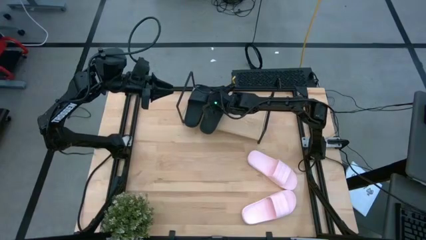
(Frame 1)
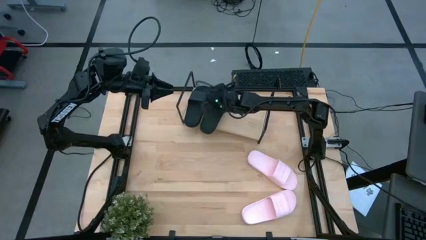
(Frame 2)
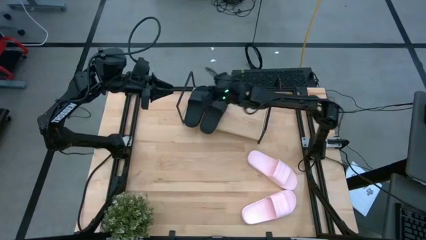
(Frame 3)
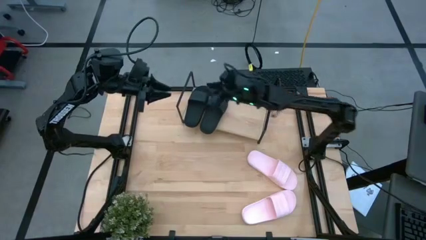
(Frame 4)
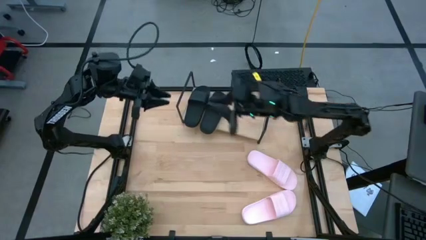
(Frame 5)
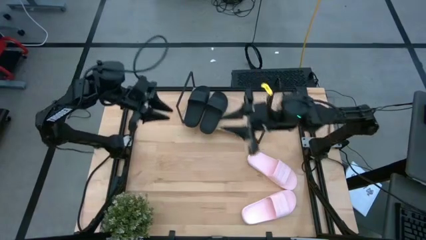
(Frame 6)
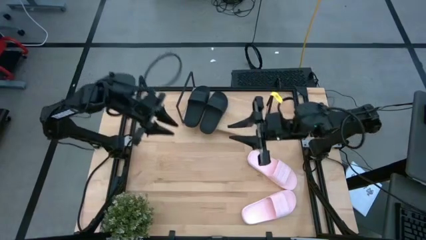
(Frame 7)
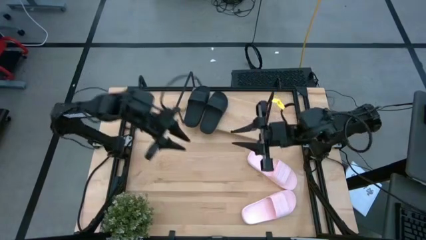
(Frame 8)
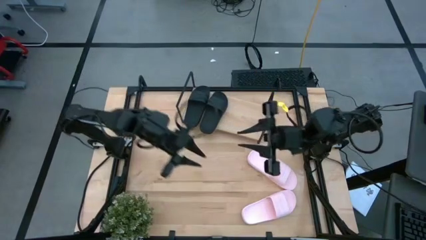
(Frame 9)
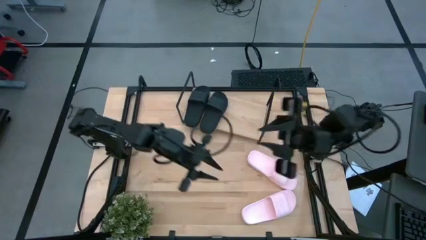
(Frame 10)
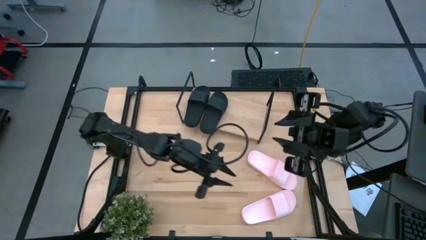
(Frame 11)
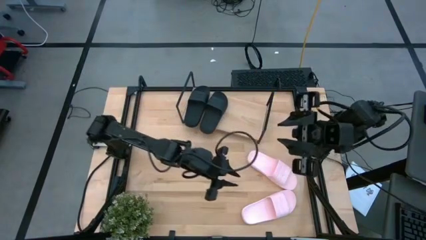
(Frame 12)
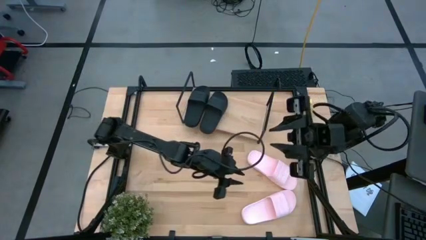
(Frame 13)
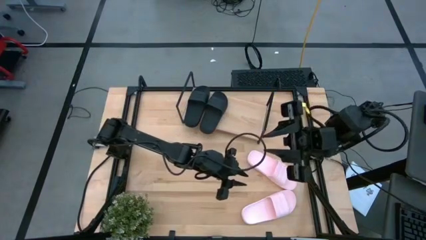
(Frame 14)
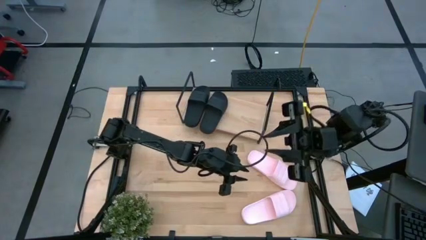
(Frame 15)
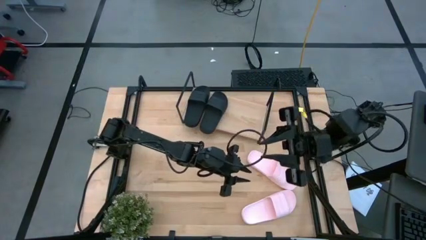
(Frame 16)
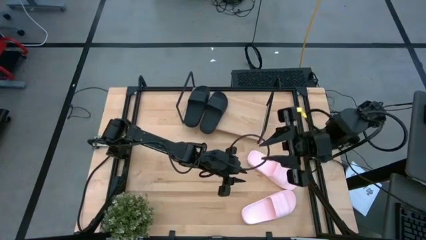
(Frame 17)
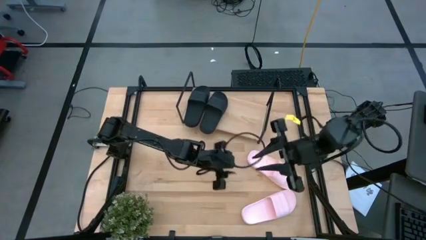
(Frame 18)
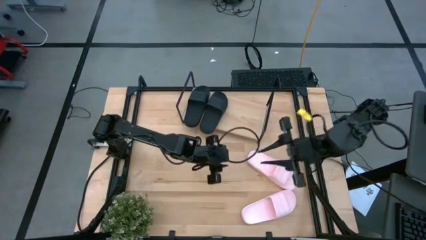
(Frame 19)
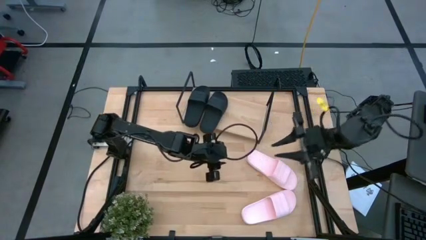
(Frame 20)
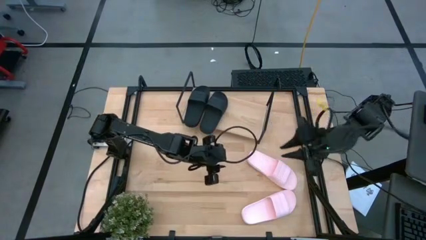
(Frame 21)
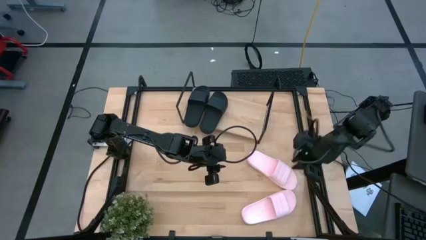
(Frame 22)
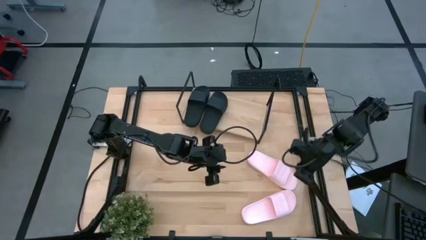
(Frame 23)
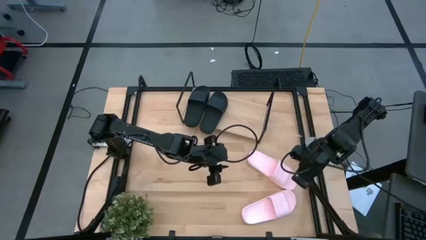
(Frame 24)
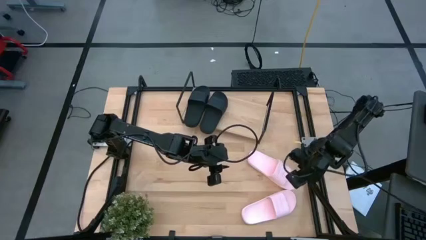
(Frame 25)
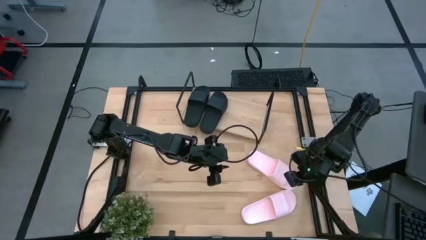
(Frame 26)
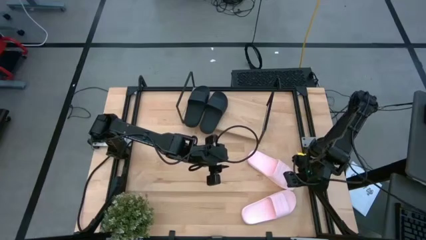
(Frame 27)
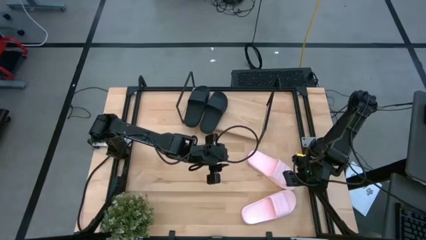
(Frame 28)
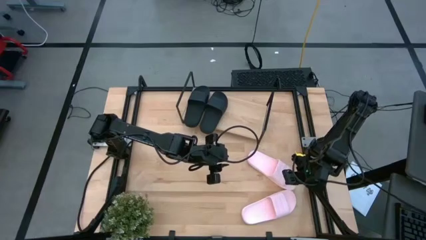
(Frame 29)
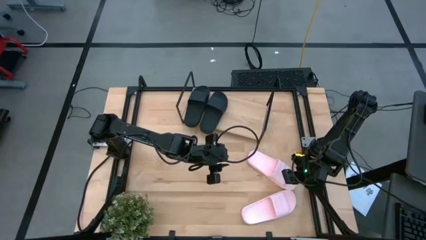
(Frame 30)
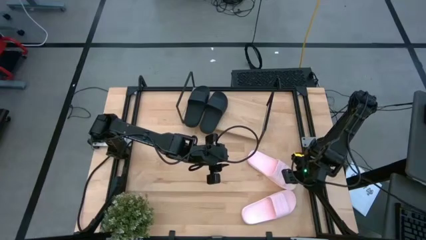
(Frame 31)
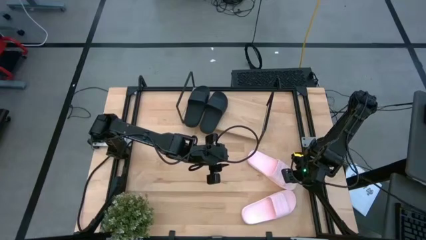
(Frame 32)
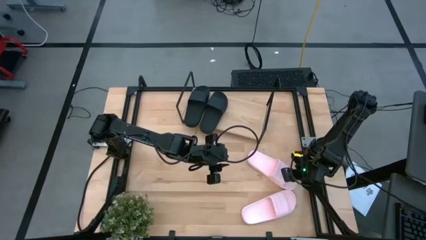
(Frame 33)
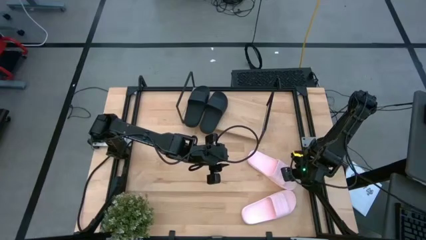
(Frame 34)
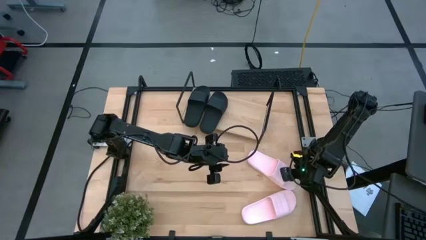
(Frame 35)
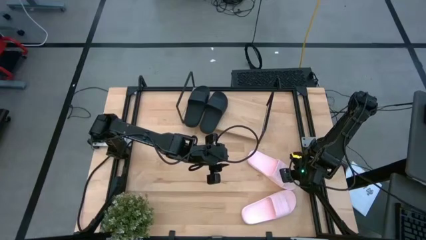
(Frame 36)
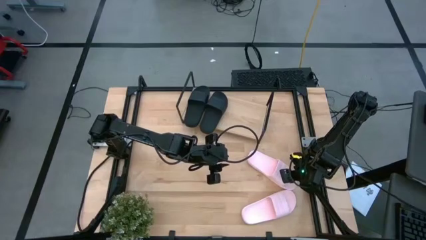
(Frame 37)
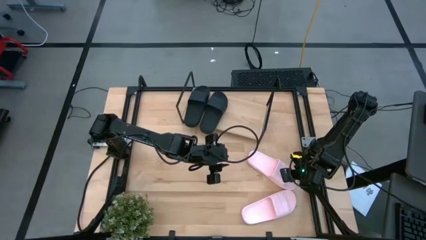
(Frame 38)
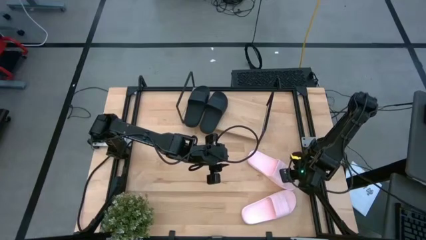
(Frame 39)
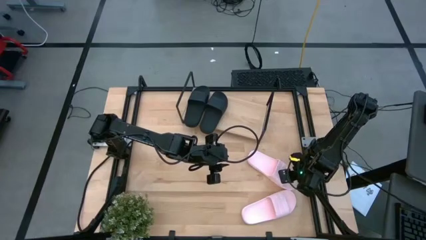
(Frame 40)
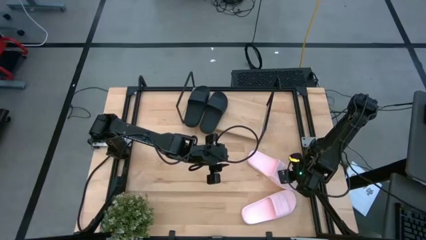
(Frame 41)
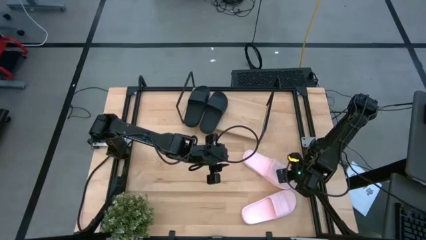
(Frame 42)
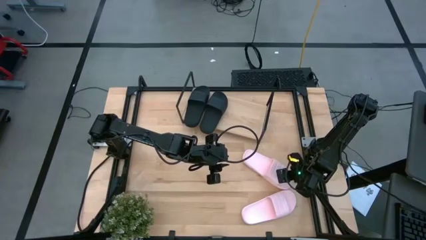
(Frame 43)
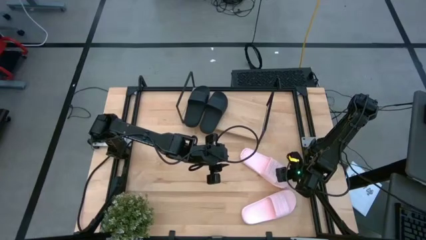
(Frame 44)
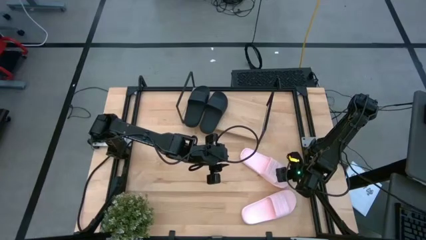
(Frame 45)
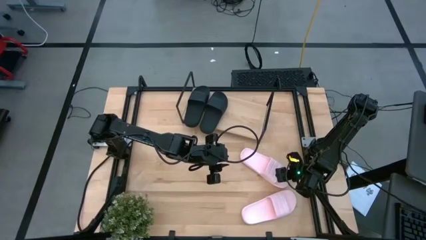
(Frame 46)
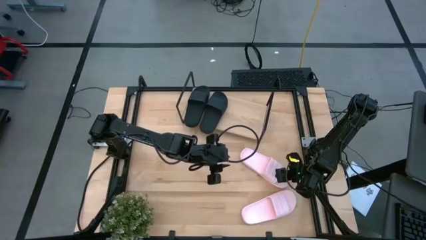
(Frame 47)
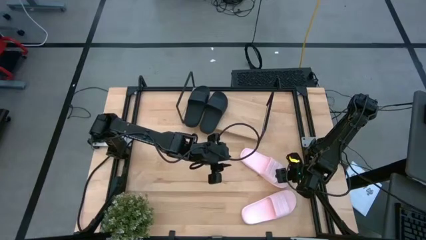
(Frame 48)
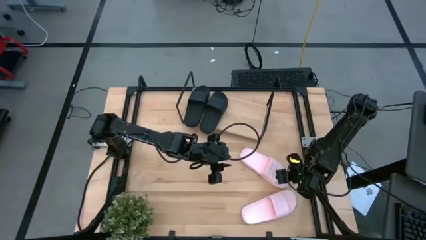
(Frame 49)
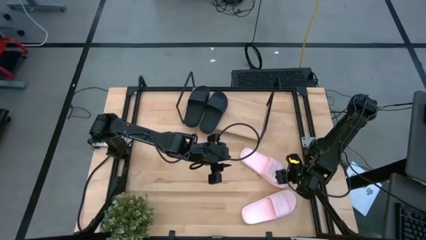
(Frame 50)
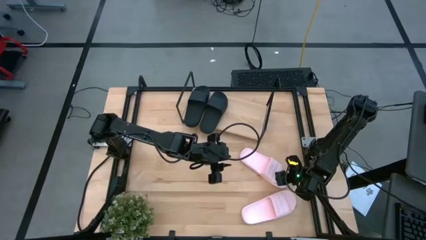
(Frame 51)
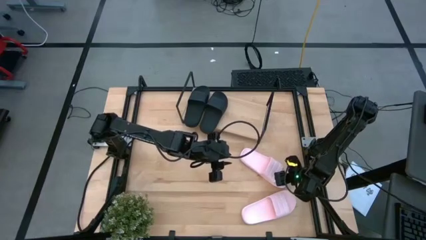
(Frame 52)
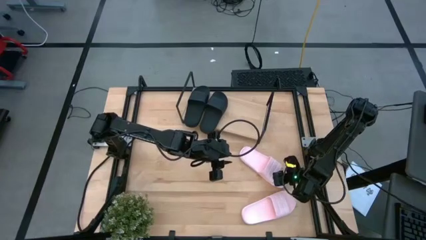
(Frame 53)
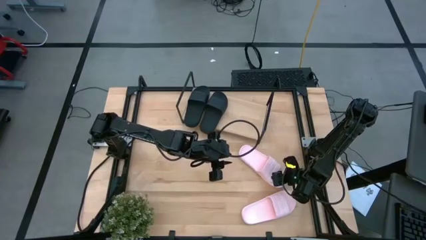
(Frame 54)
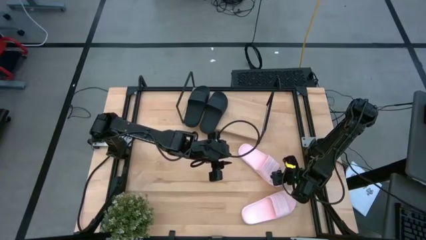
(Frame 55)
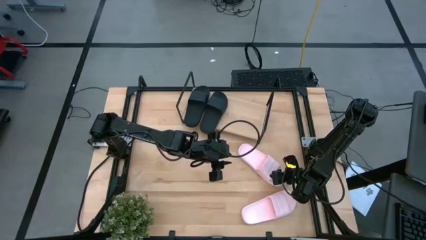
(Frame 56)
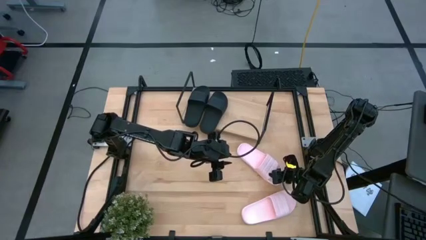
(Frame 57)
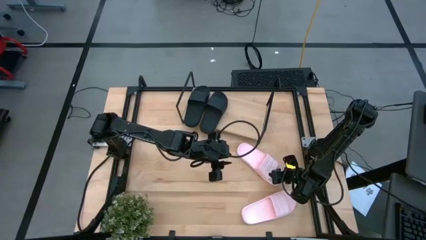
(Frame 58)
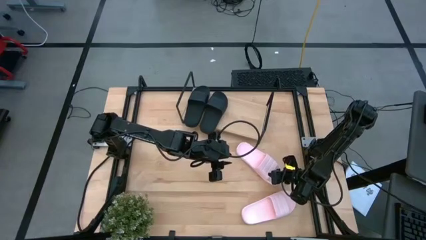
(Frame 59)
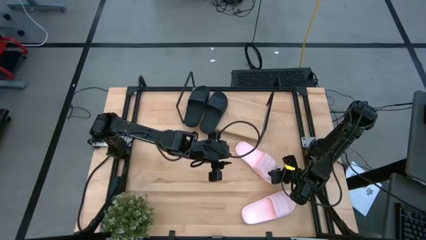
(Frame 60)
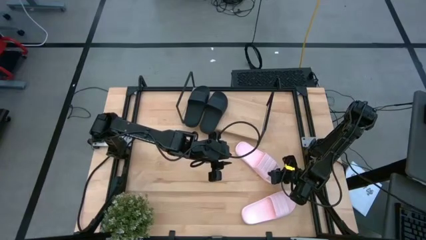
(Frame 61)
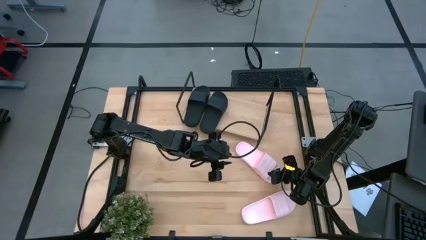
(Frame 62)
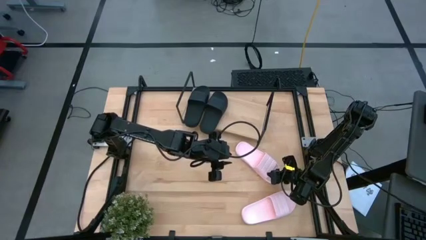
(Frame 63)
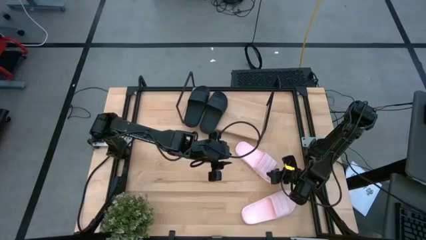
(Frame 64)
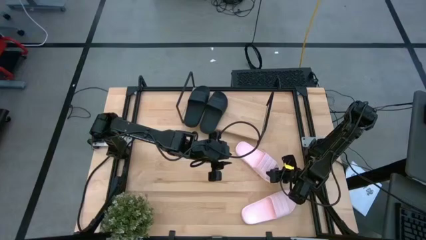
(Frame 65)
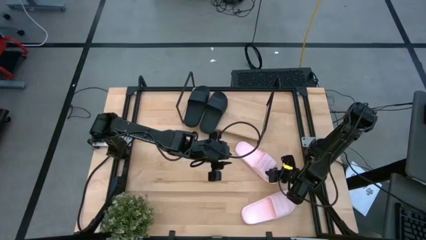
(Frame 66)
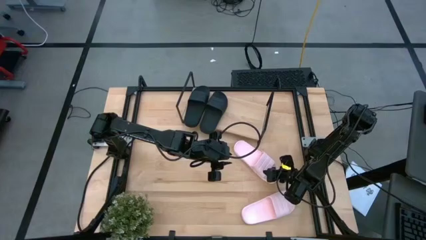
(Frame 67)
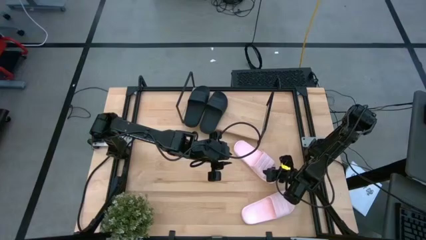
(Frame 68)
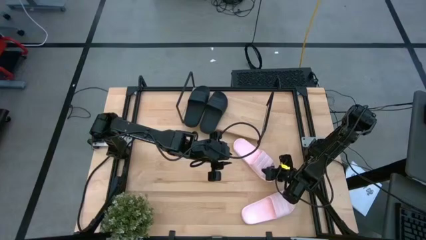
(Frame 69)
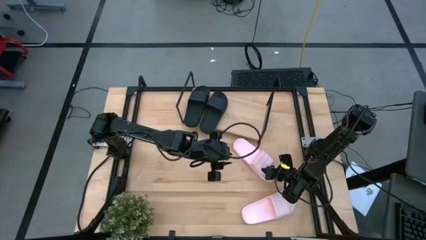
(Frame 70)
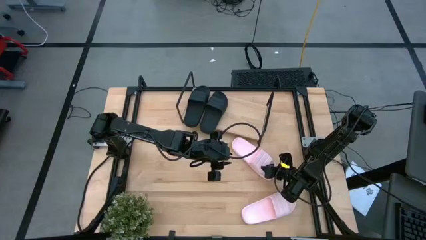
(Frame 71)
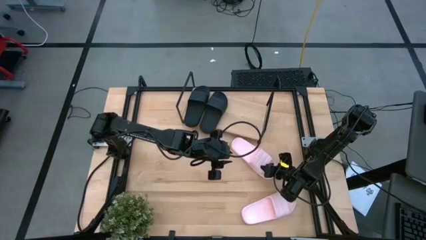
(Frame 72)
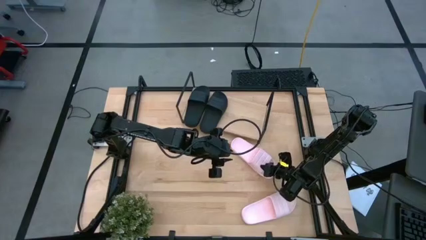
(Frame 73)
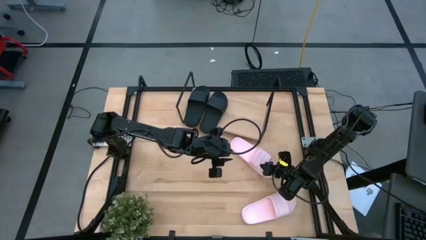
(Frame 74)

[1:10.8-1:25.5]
Task: Pick and place slides into the shelf
Put the top pink slipper on the shelf

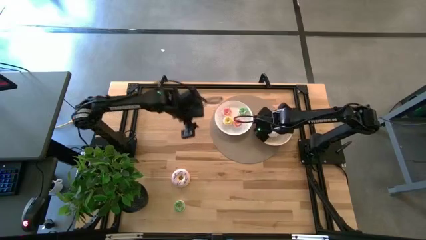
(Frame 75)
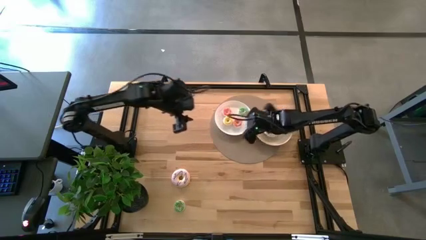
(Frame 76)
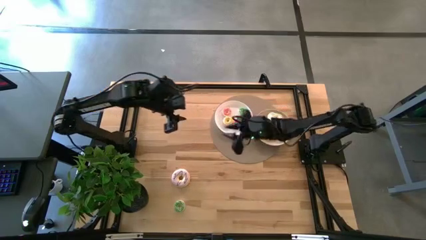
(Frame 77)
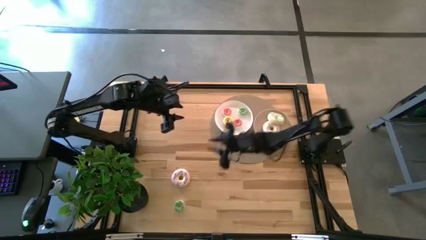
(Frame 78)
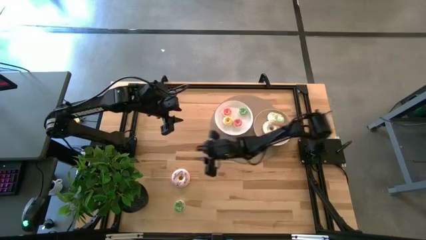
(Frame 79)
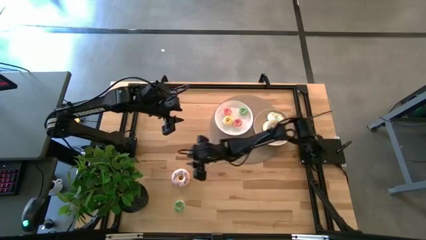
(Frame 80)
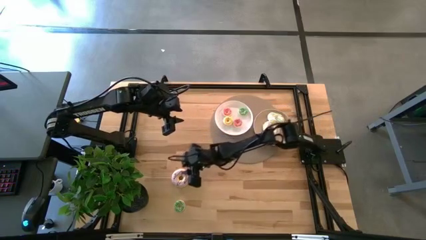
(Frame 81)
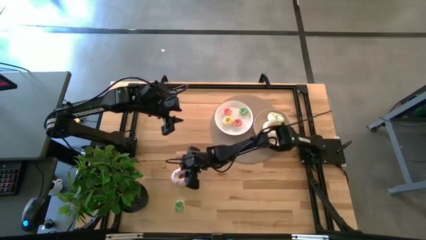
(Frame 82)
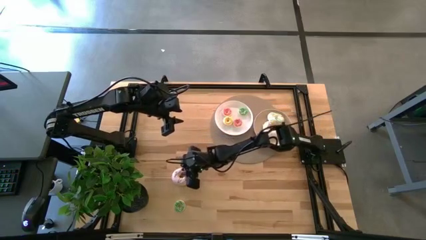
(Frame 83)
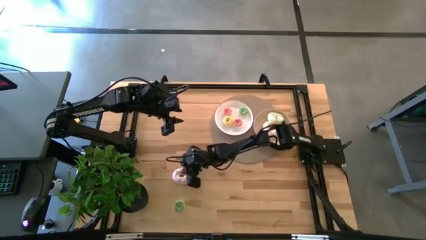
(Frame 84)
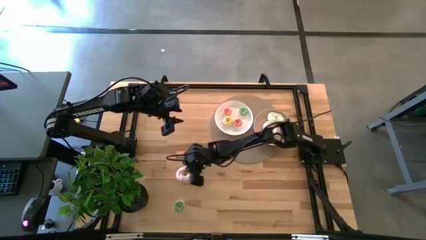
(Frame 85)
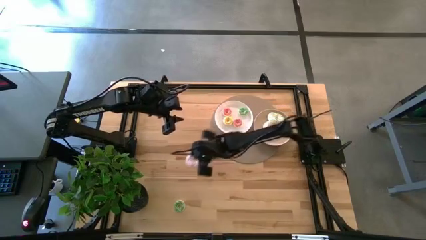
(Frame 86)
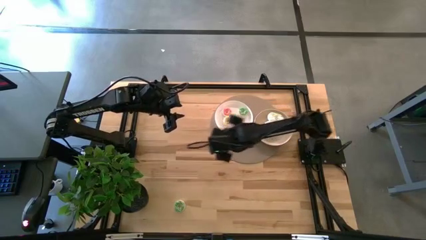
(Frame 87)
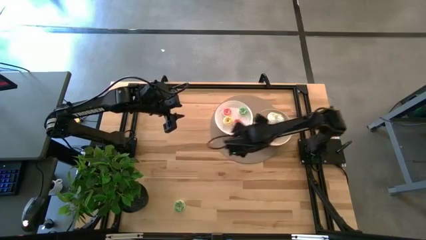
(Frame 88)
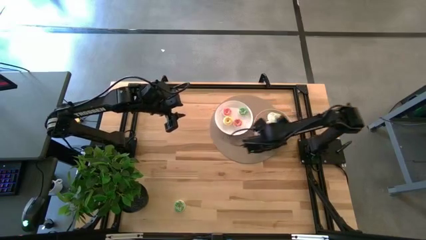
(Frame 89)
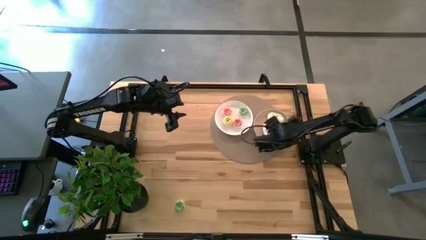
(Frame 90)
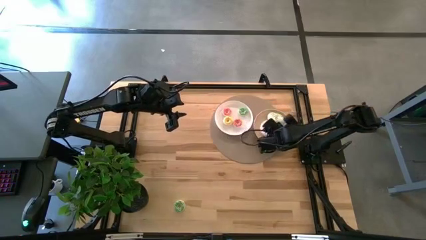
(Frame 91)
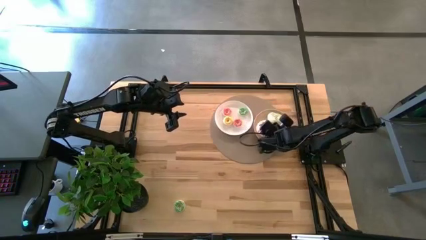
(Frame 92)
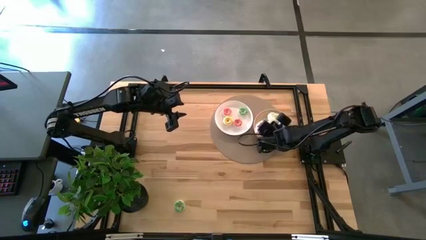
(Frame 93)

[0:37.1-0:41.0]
Task: Pick & Place donuts
Put the large purple donut on the brown plate
